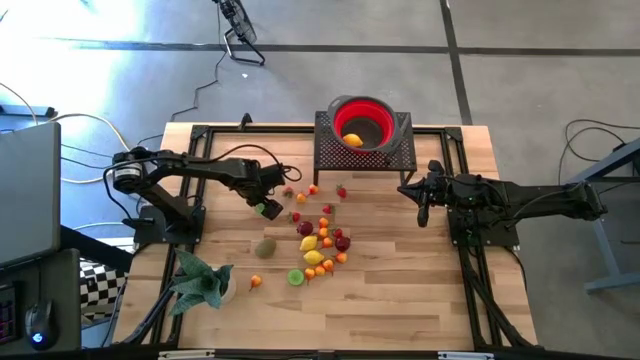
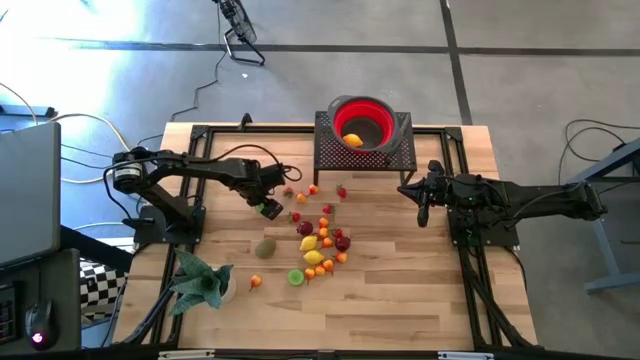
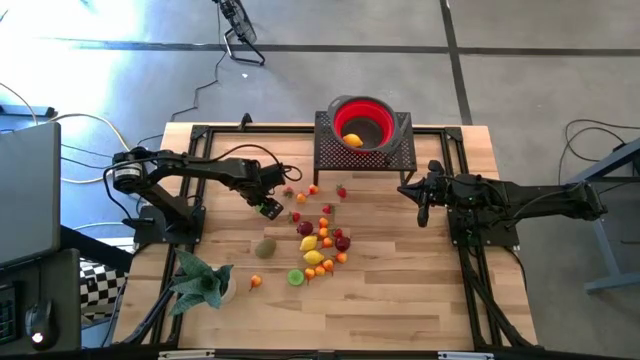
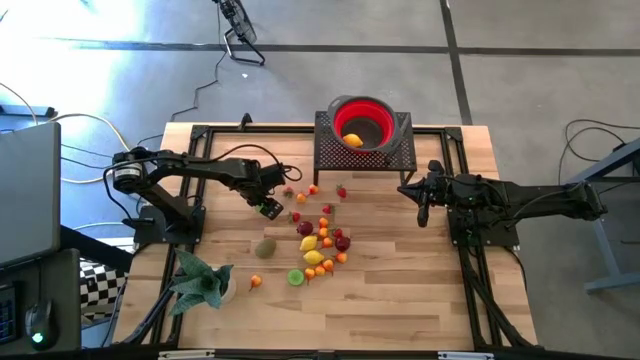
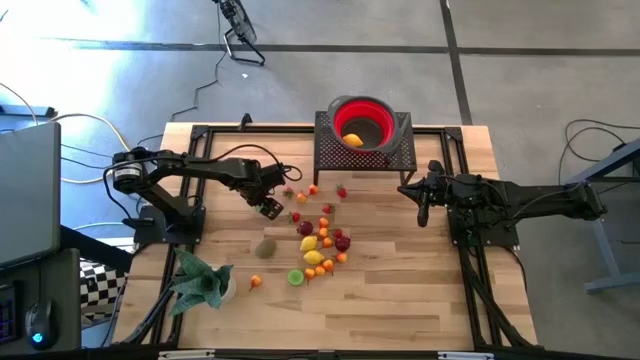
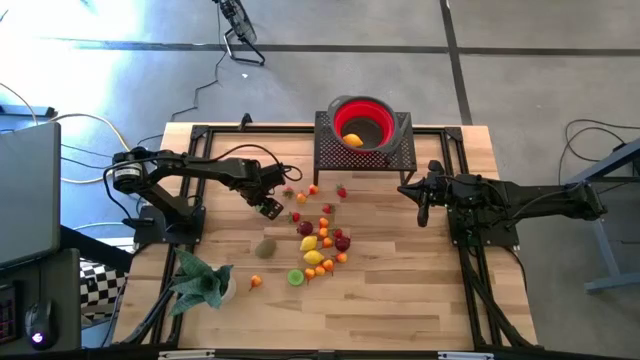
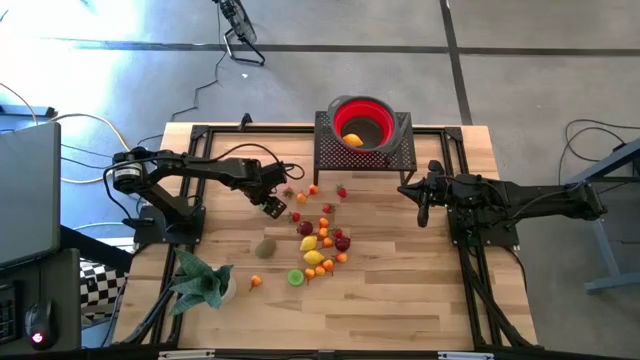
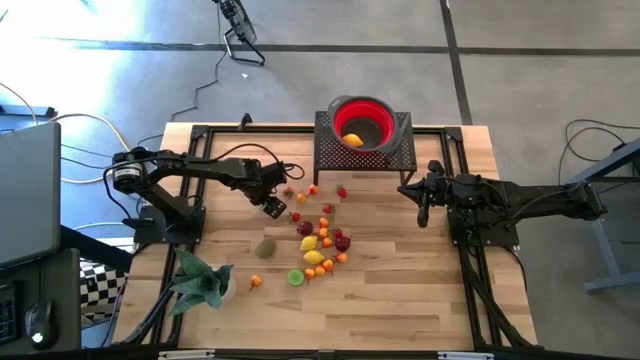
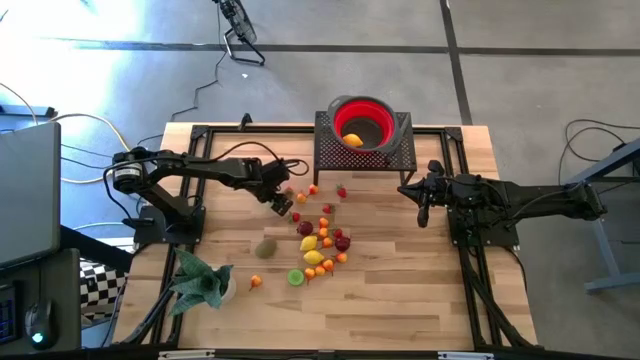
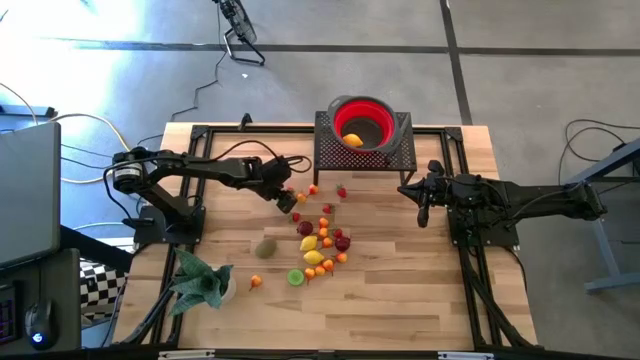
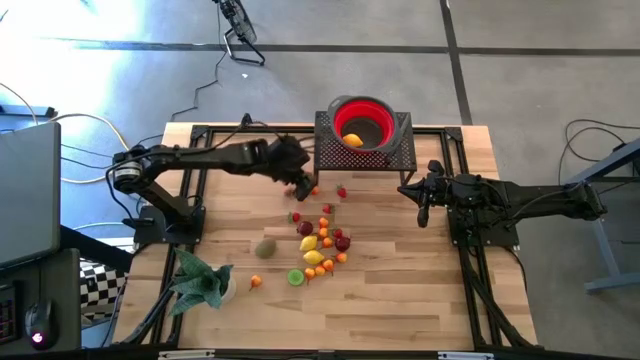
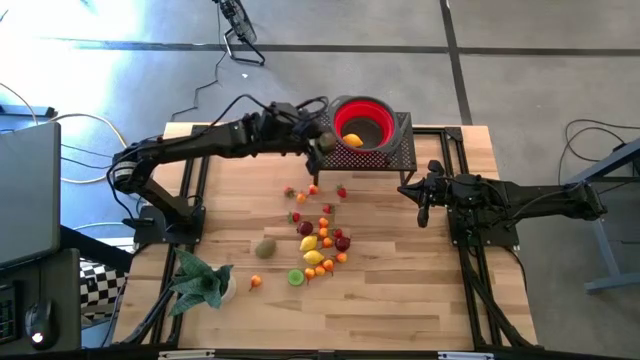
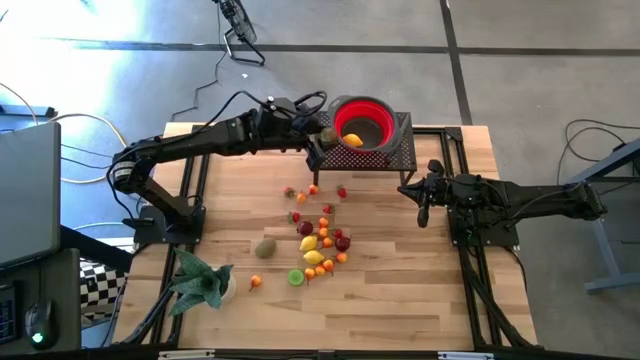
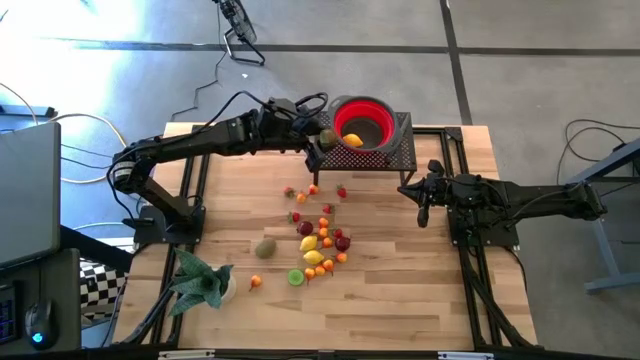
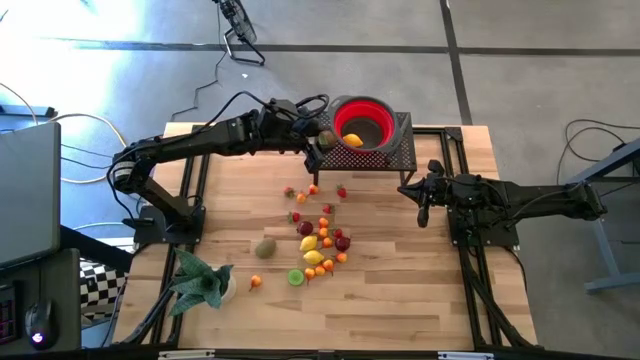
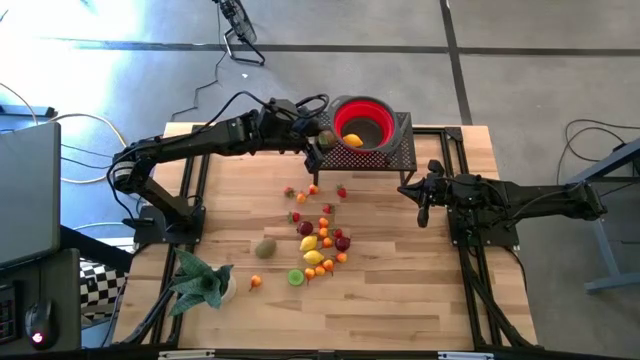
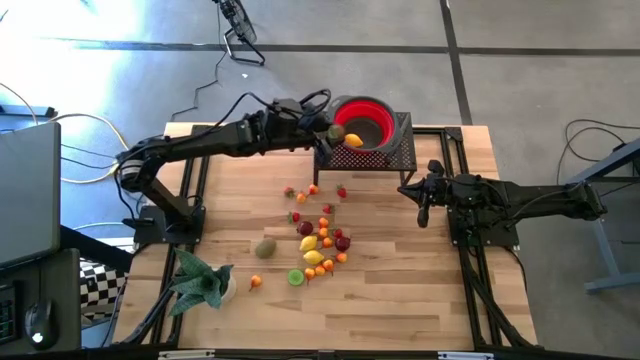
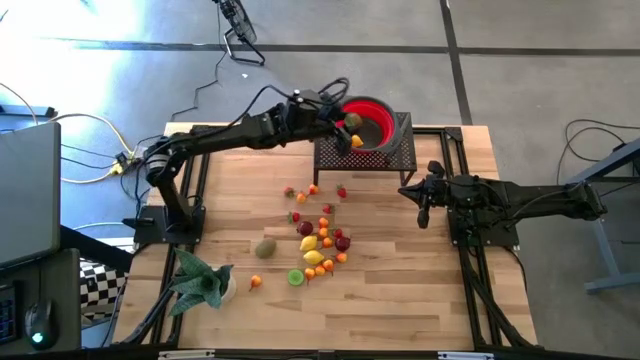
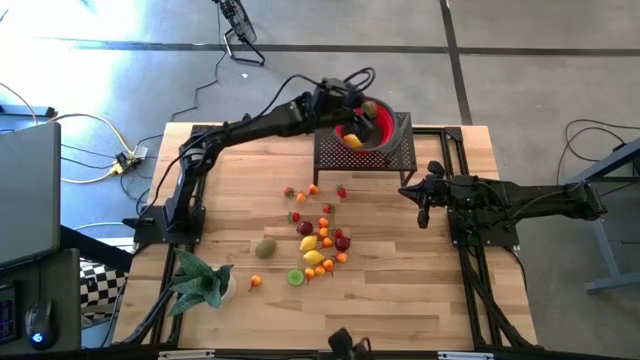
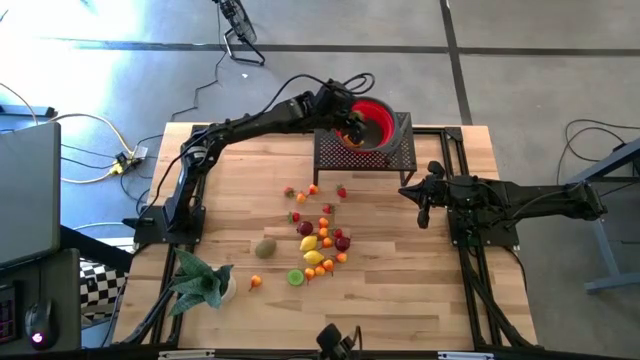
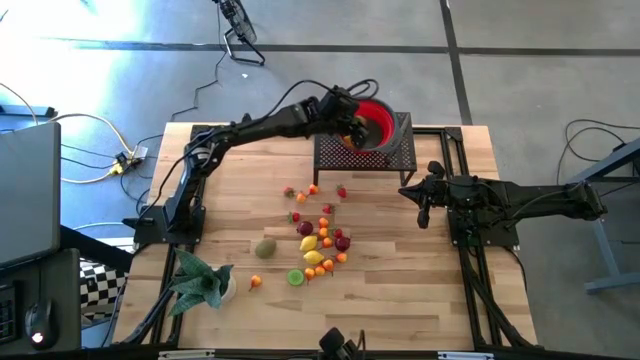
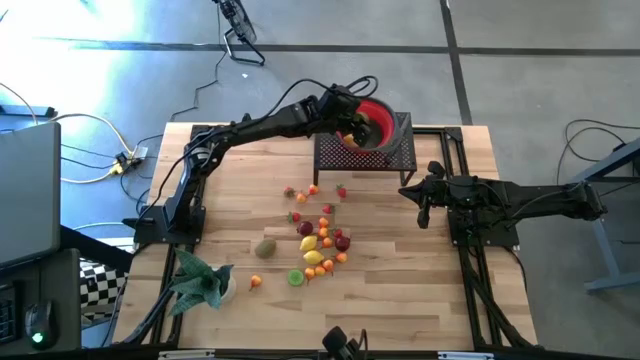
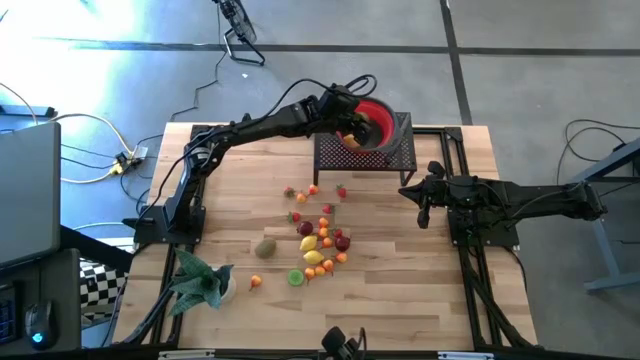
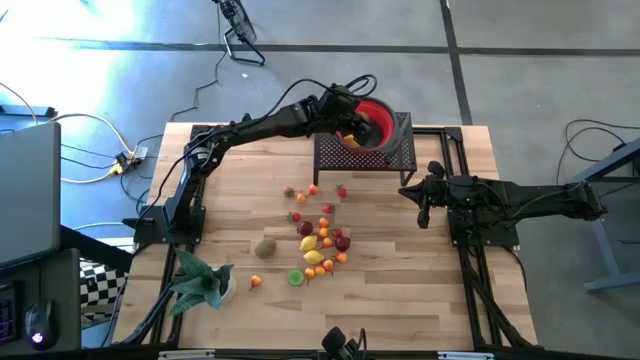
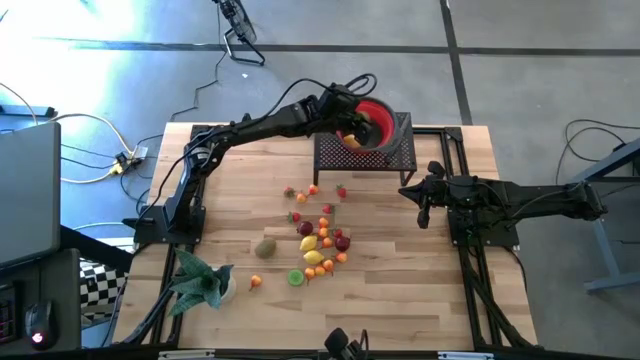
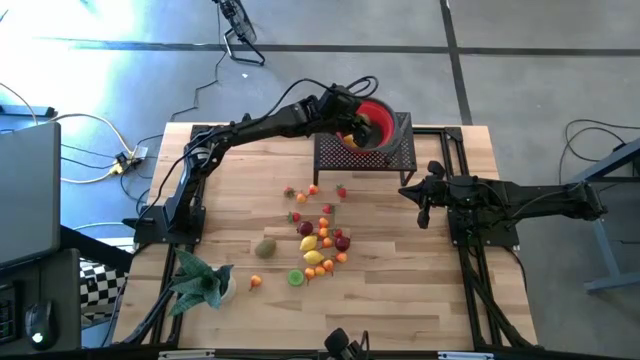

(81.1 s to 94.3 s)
Task: Pick & Place Fruit
Put the half kiwi into the strainer on the shelf

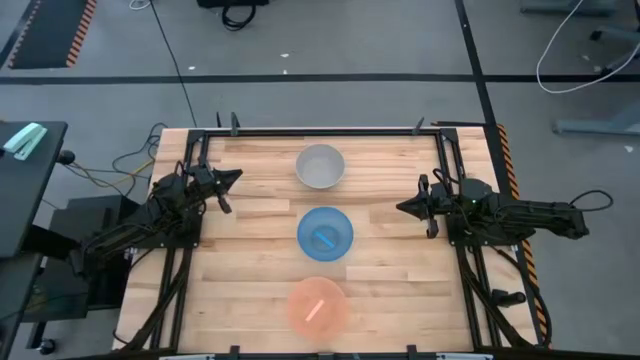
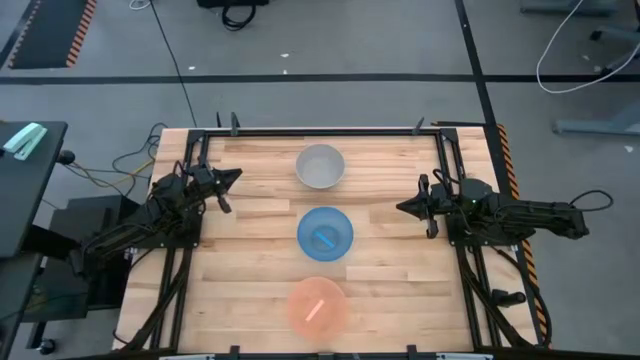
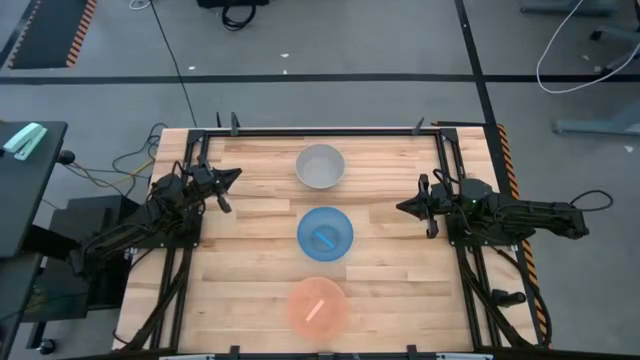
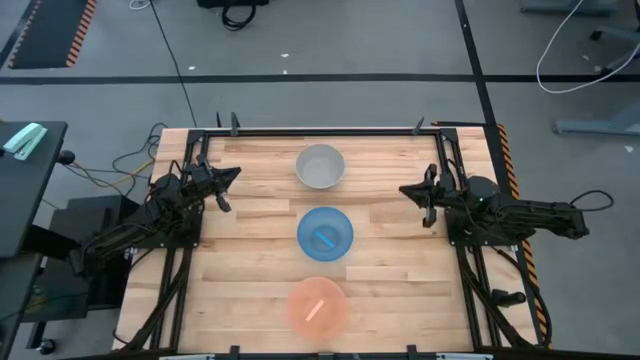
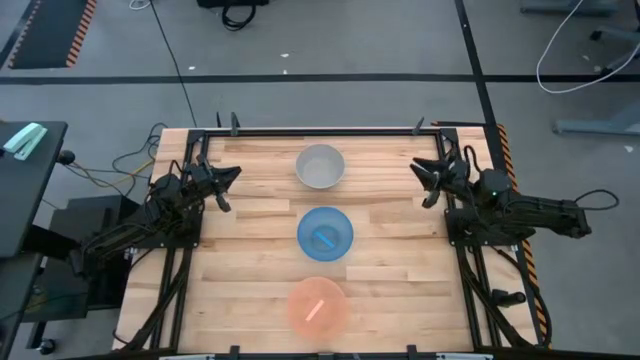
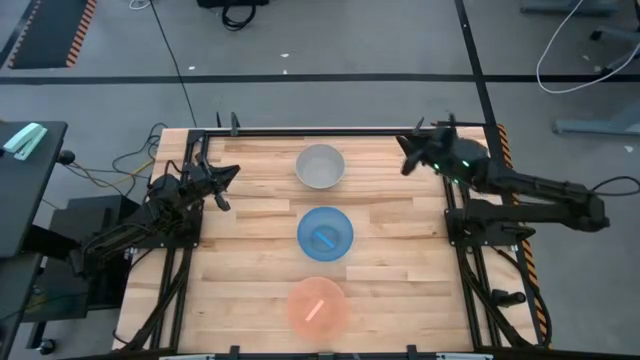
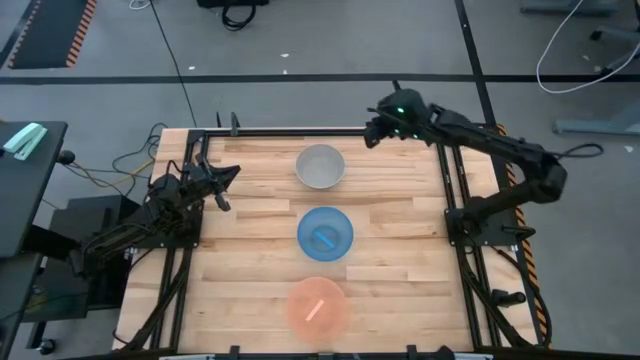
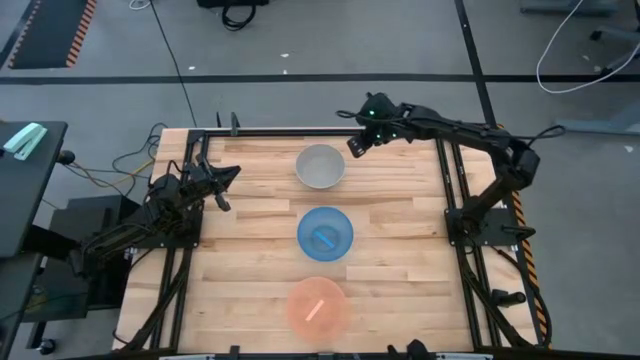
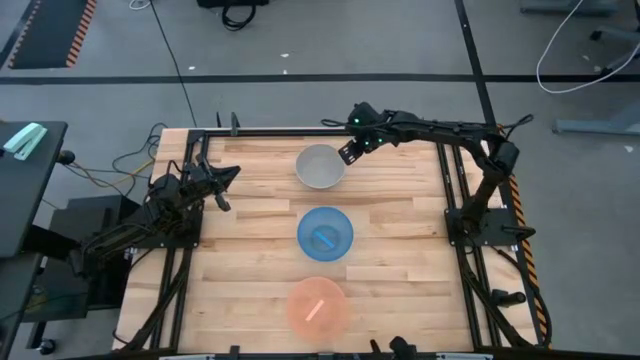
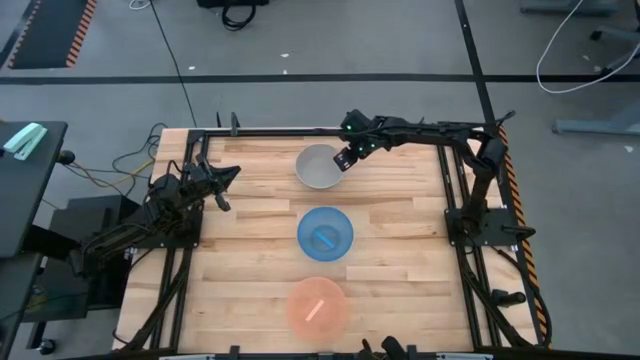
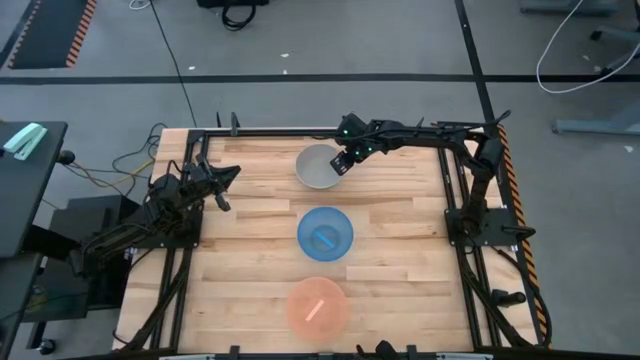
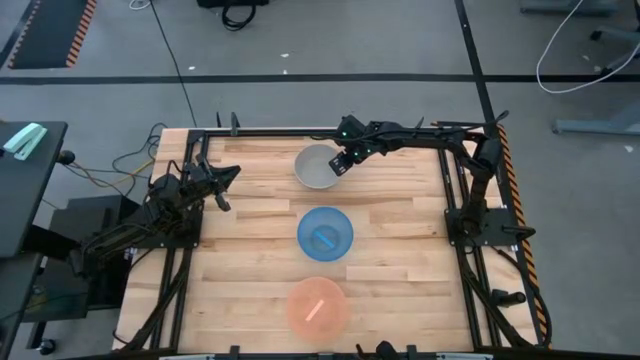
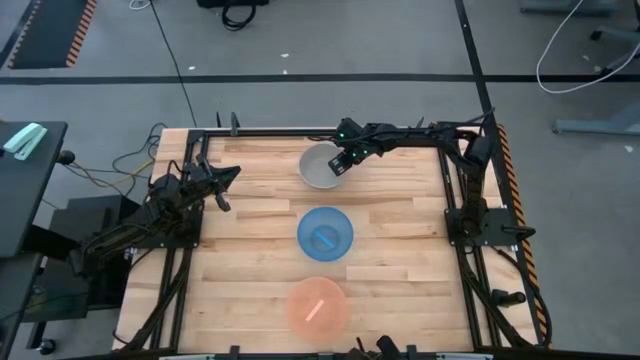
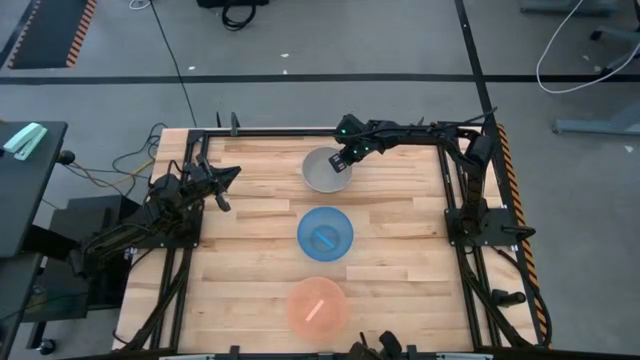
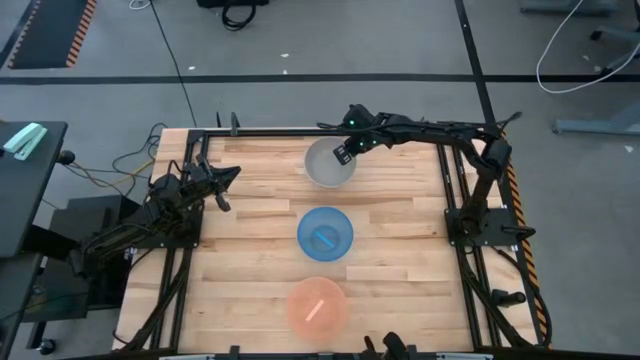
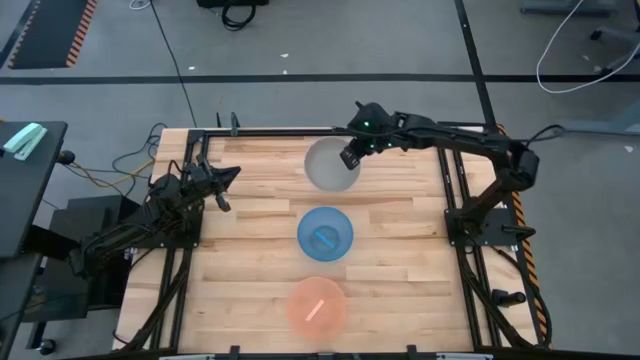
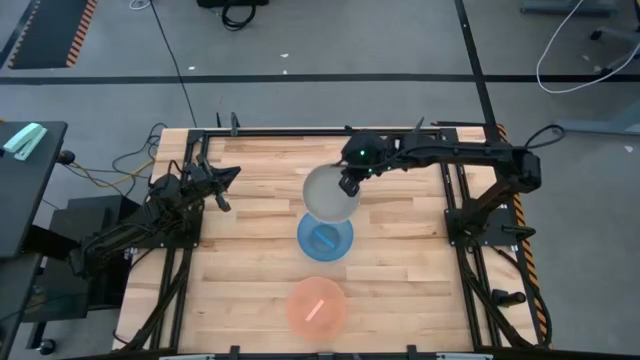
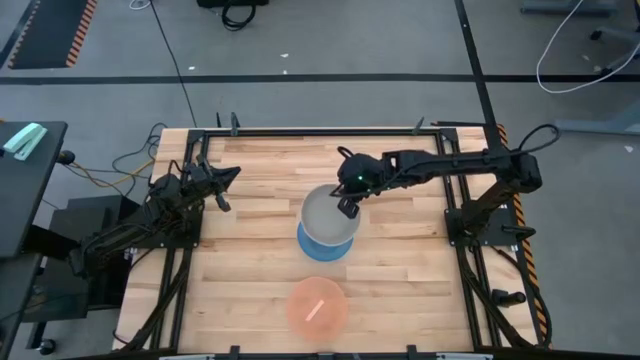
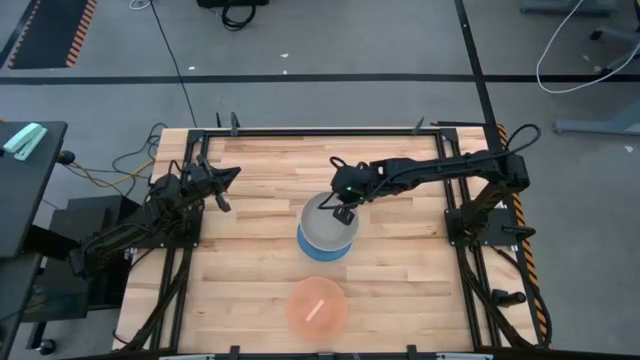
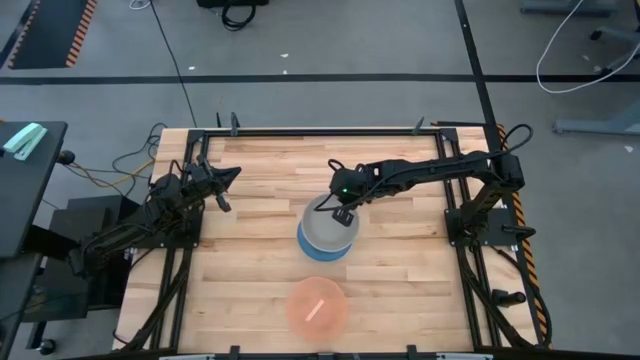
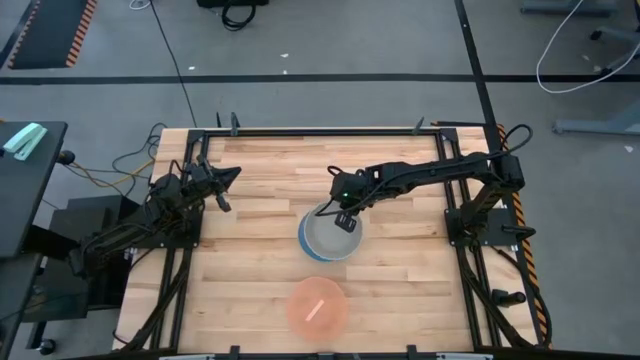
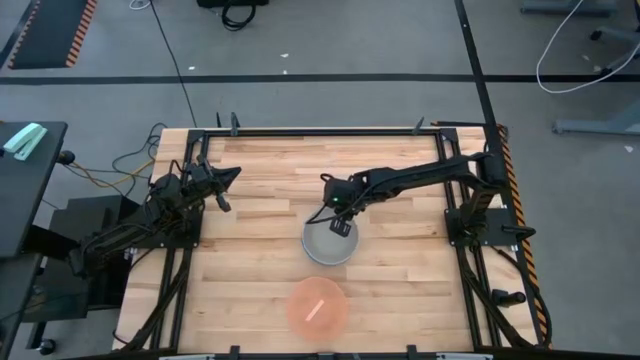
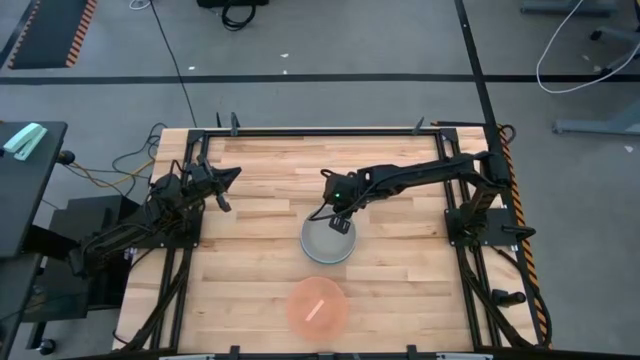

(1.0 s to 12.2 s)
Task: Nest bowls inside each other
Stack the gray bowl on the blue bowl
